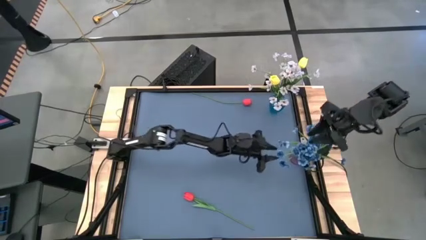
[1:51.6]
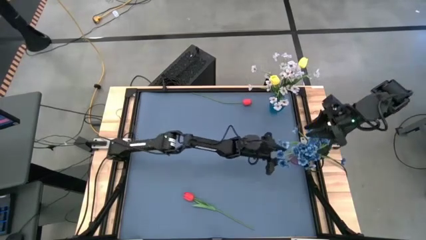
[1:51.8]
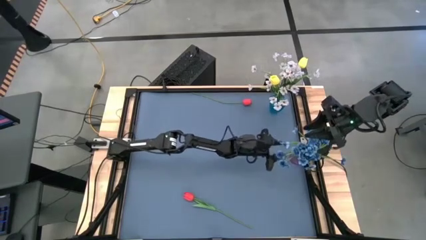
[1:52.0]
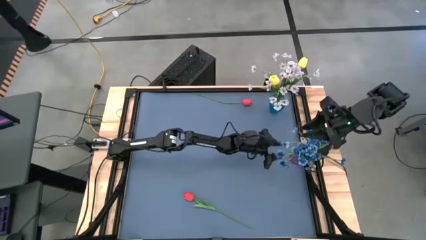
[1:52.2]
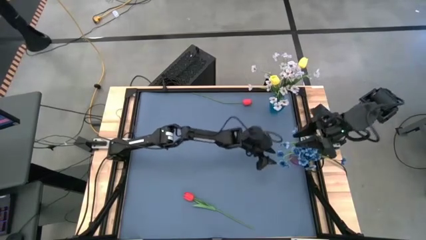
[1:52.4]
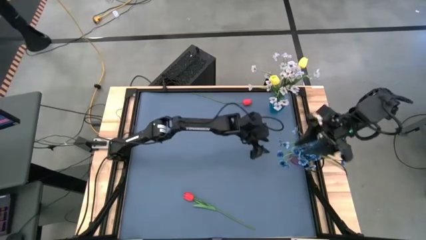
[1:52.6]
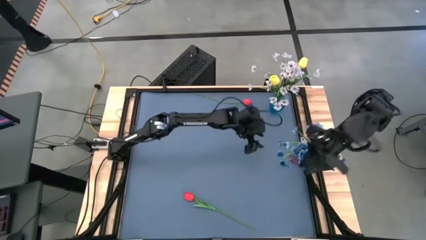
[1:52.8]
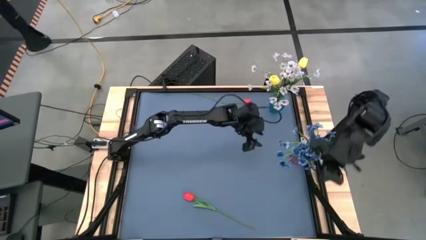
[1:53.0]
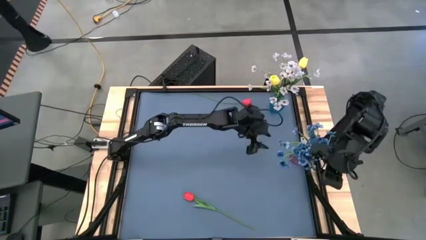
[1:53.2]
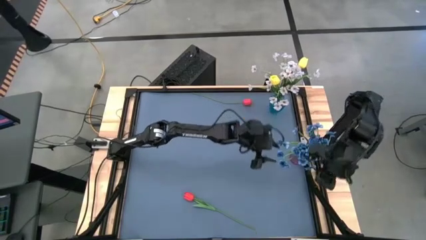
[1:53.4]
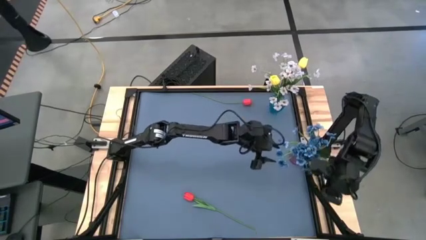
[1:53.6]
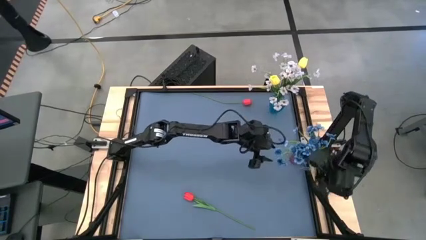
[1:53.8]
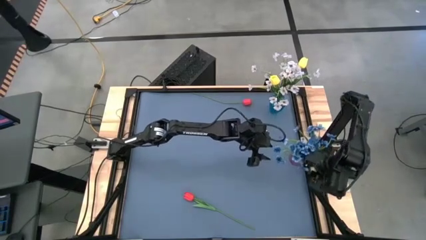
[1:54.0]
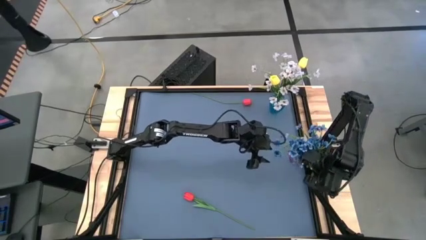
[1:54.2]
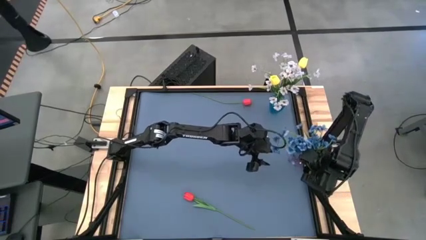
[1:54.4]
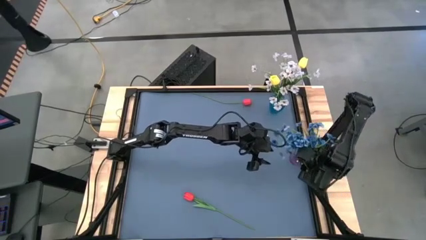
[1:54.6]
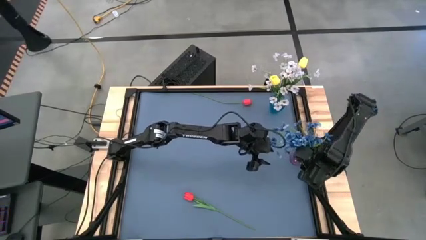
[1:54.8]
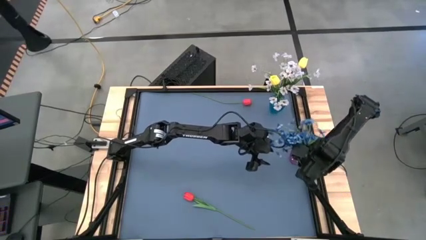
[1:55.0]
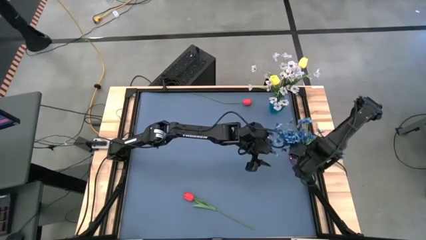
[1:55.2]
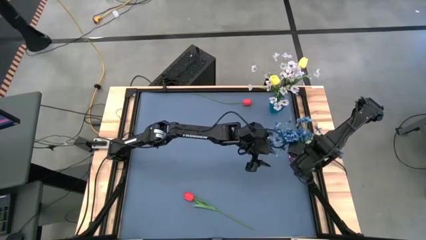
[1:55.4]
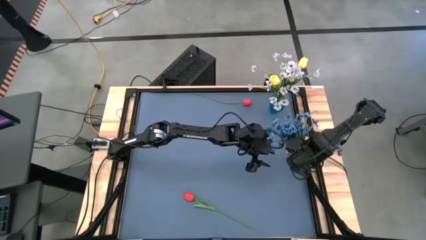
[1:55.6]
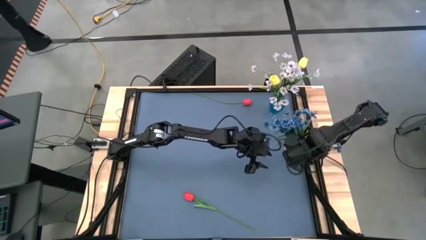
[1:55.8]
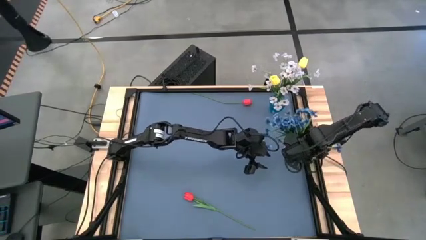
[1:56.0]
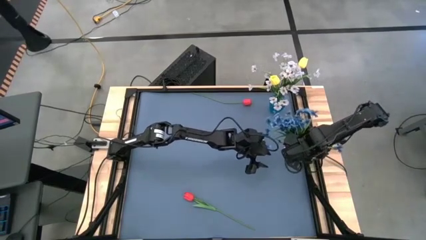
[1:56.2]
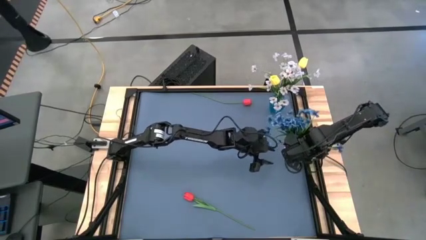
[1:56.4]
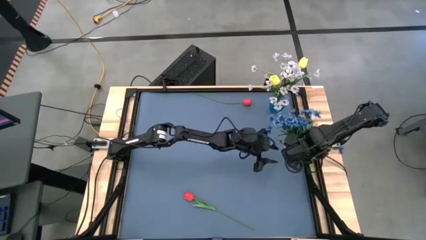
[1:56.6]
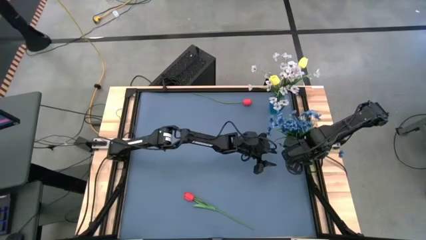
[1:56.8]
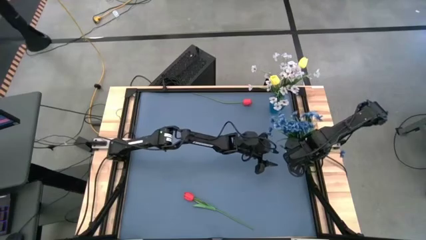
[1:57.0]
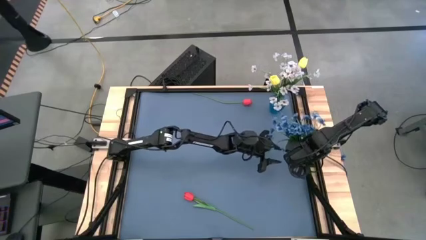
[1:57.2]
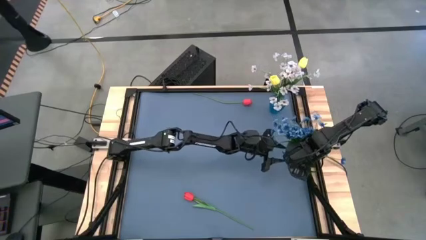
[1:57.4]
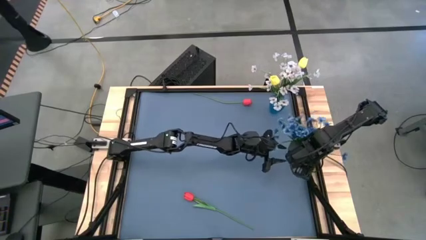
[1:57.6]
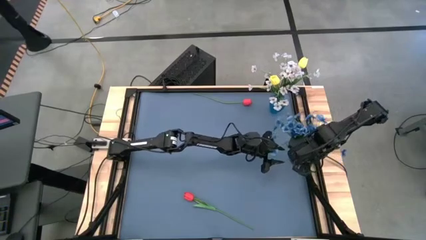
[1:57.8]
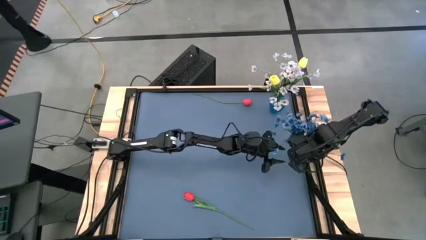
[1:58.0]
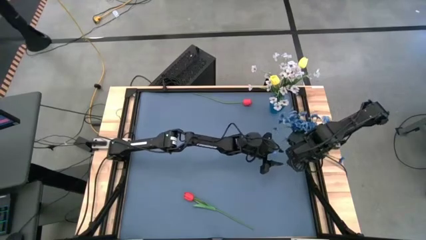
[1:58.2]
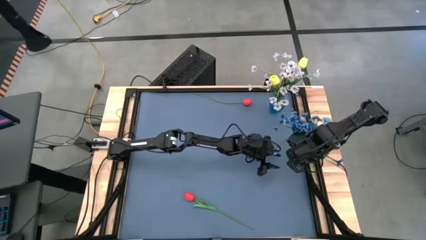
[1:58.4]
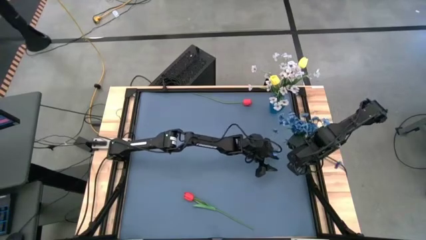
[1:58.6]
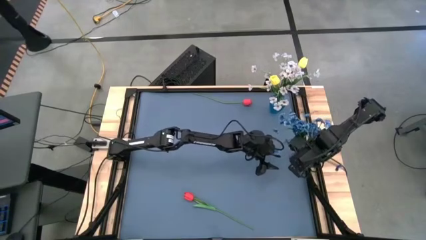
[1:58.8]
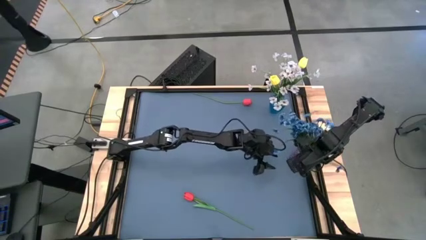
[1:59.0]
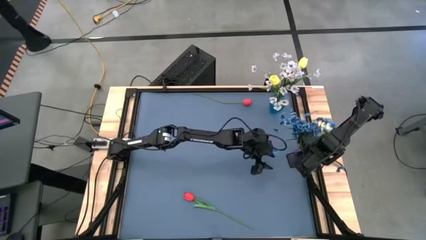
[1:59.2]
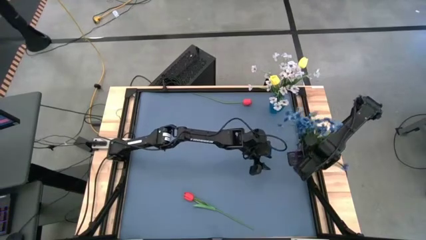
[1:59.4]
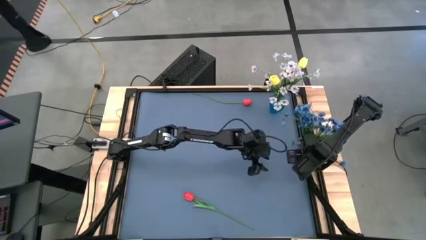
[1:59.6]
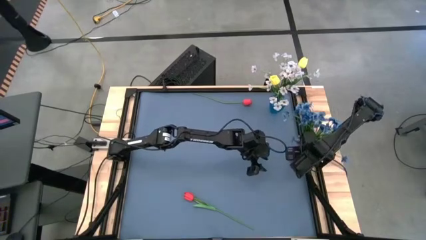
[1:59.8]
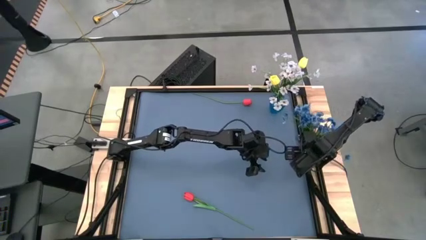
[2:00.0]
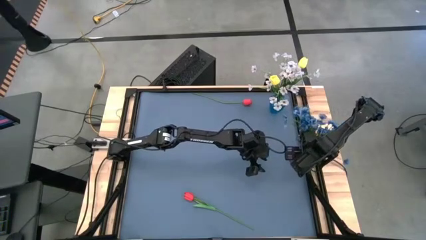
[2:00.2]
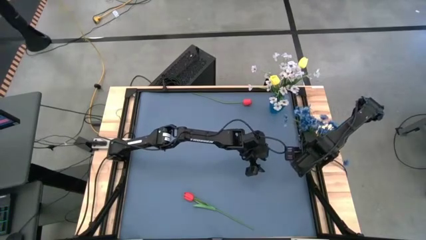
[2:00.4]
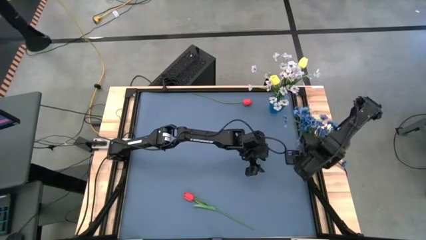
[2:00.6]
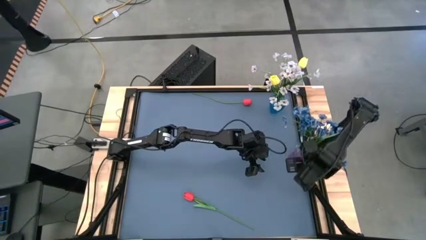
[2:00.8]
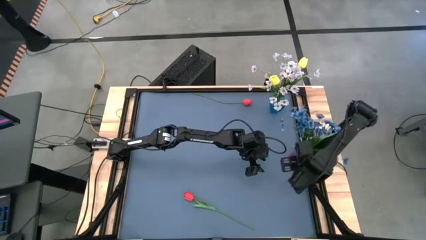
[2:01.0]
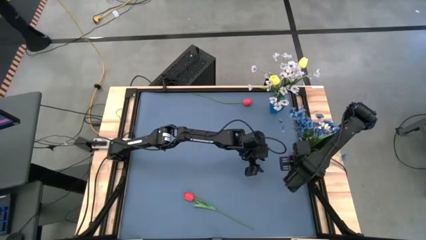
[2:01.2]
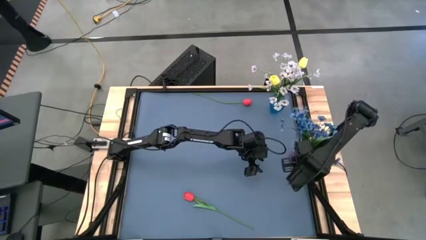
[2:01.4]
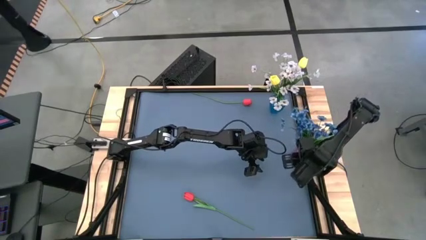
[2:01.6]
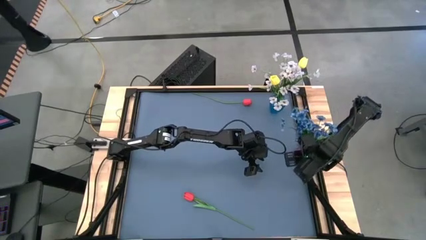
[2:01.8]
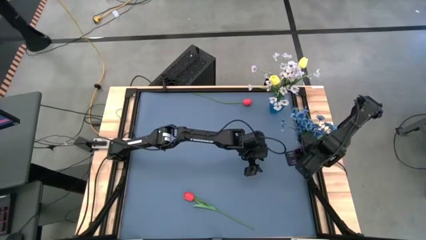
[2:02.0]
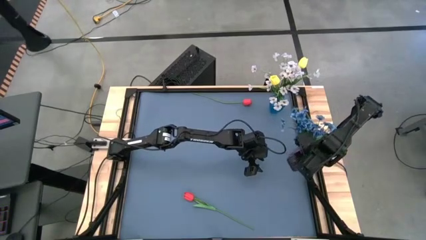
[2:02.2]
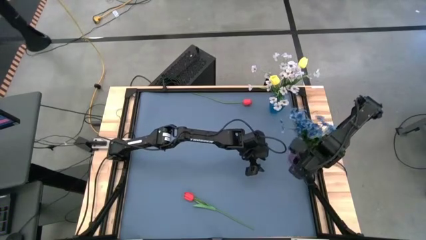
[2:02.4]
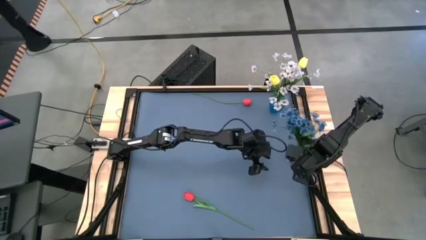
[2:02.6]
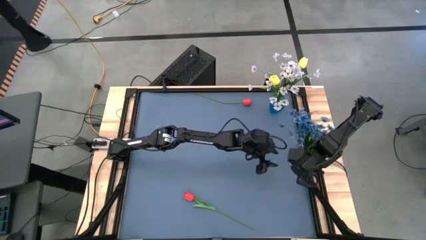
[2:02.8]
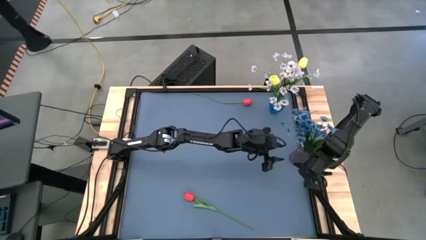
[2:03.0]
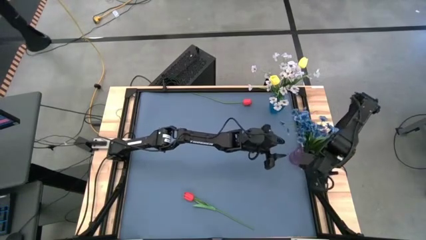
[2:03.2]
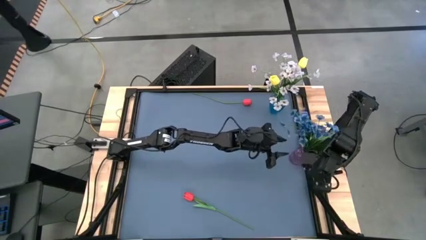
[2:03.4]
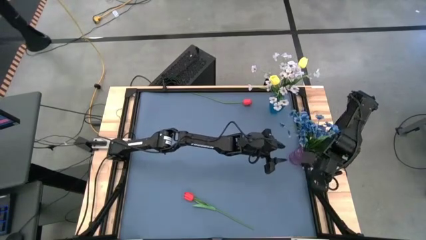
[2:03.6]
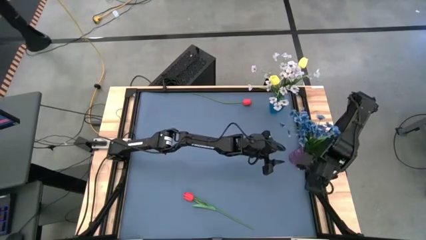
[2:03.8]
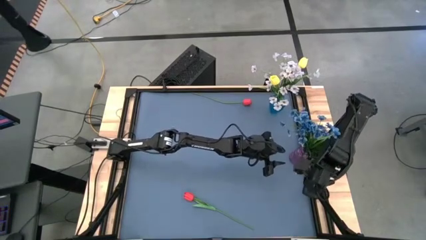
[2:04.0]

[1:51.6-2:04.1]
Task: Sort flowers into vase by color
Adjust the violet vase
